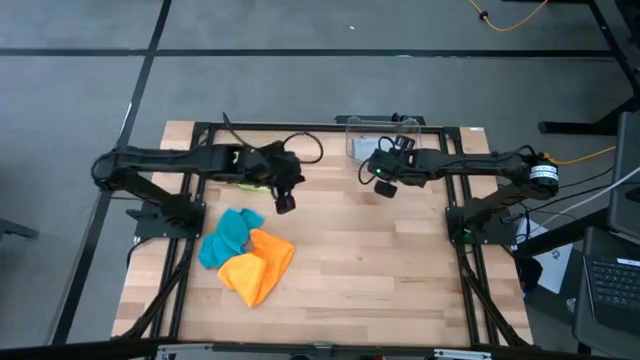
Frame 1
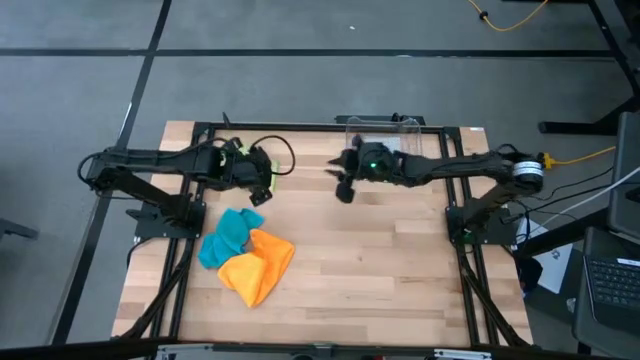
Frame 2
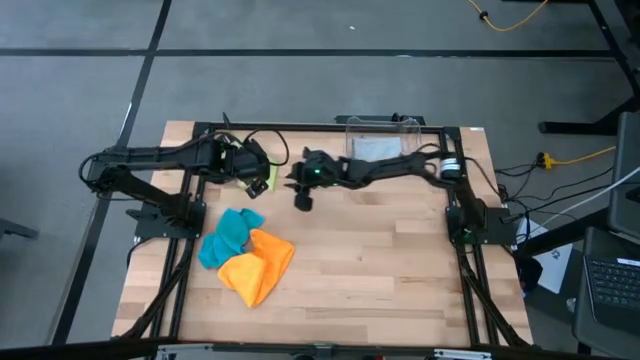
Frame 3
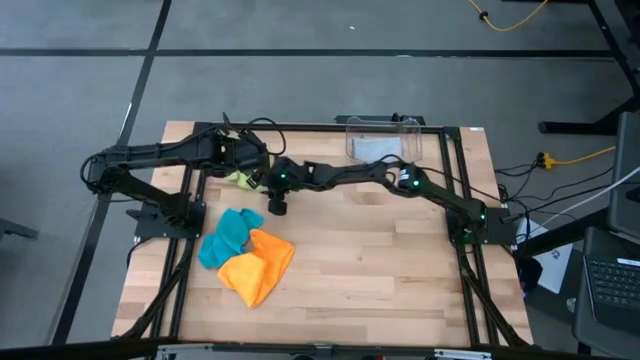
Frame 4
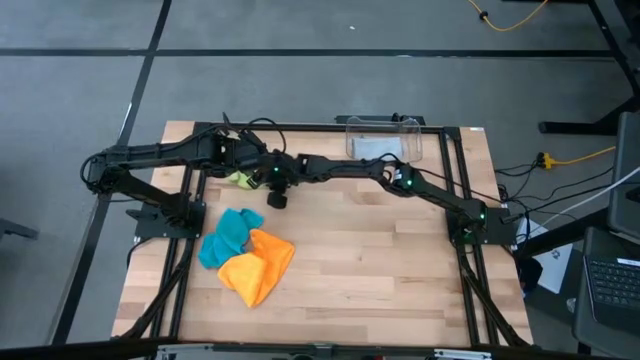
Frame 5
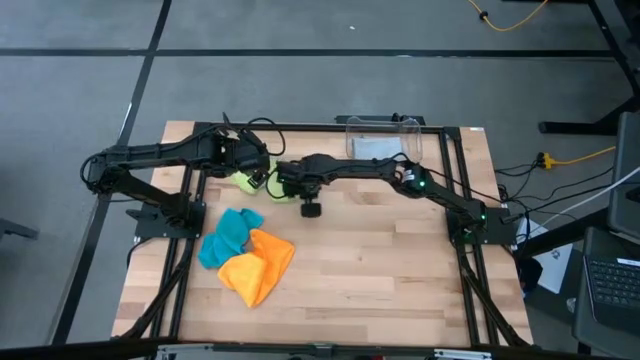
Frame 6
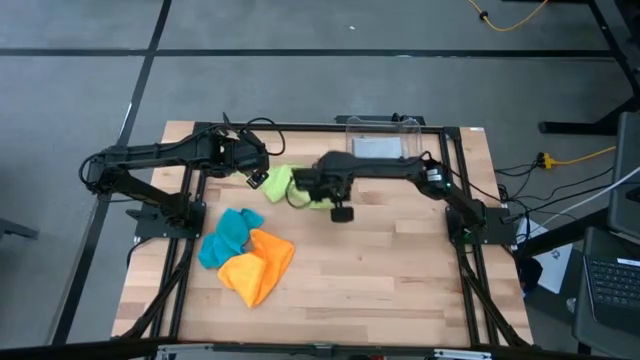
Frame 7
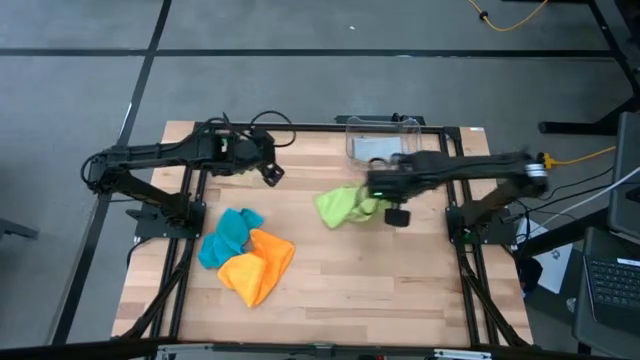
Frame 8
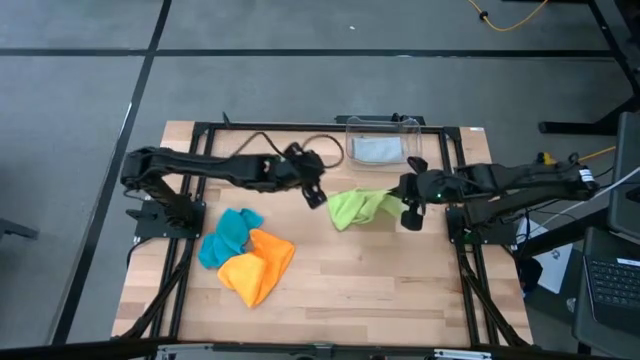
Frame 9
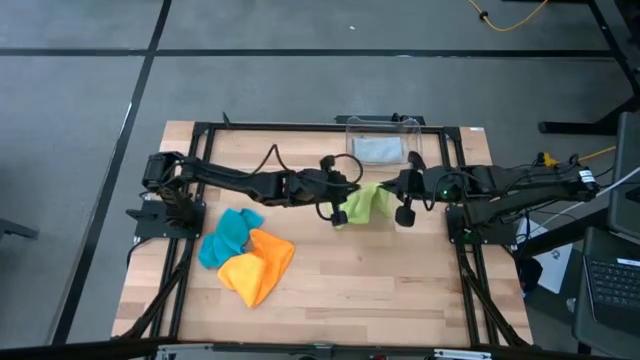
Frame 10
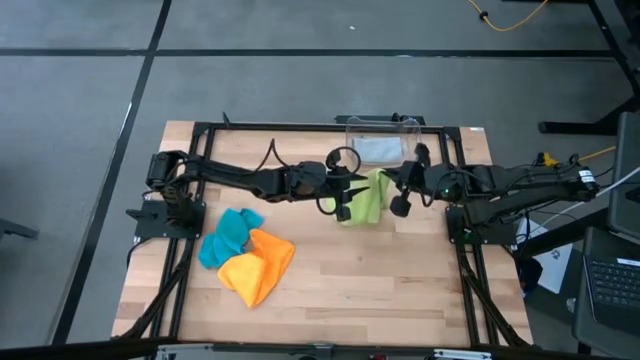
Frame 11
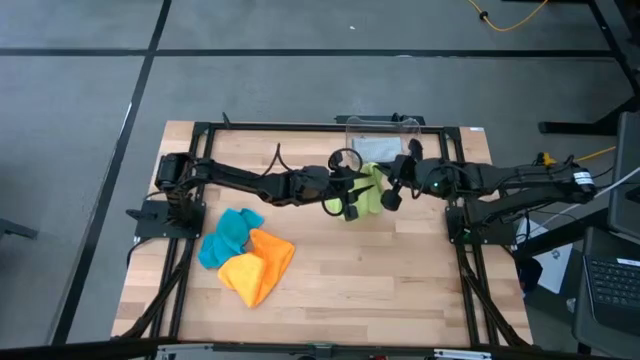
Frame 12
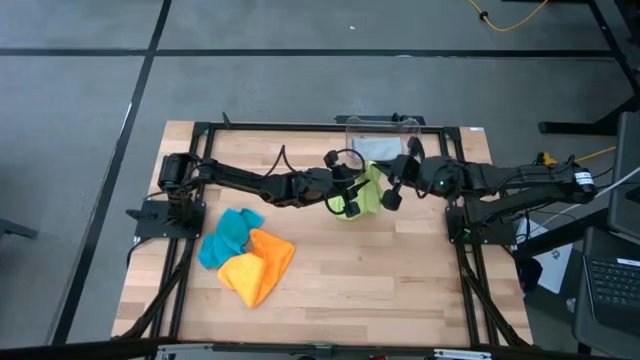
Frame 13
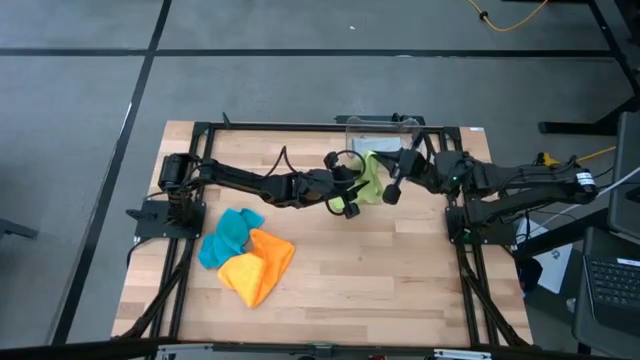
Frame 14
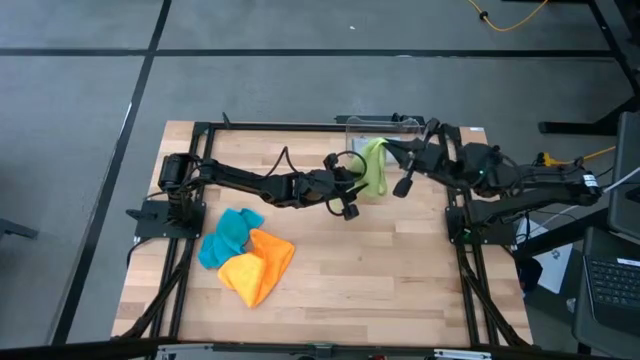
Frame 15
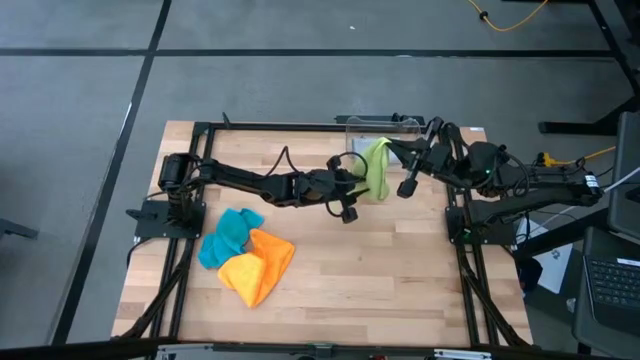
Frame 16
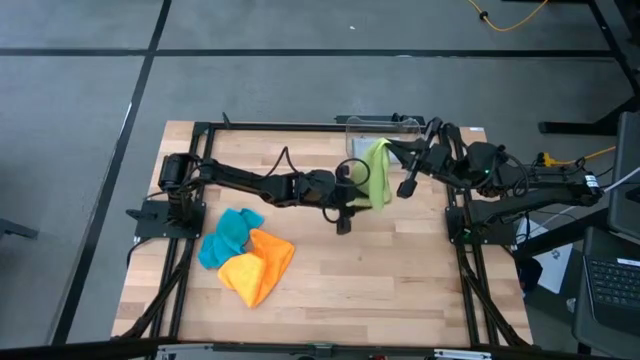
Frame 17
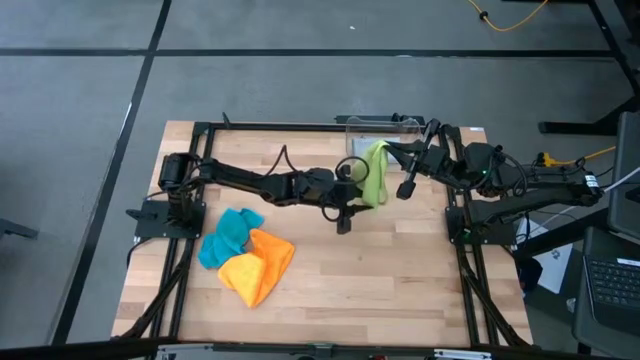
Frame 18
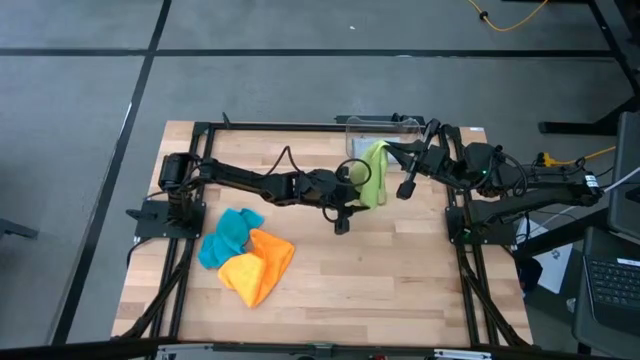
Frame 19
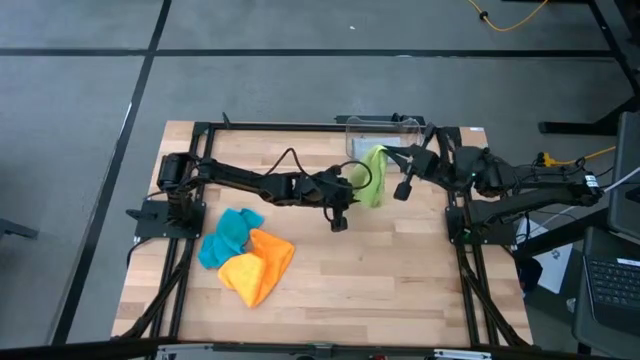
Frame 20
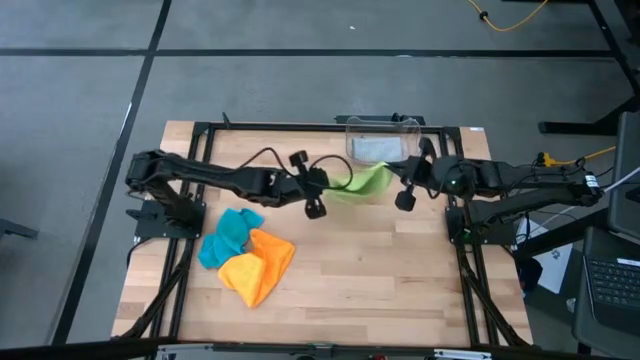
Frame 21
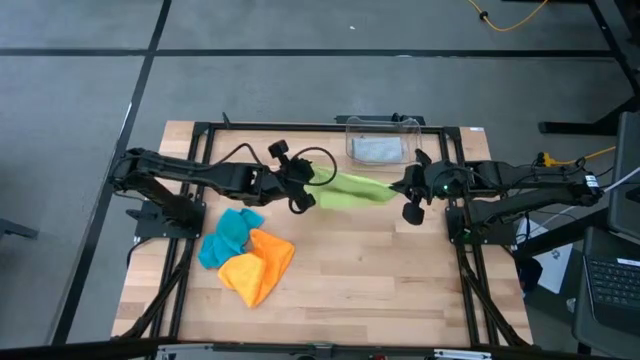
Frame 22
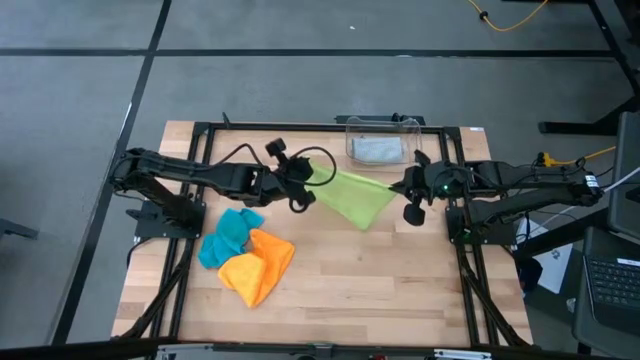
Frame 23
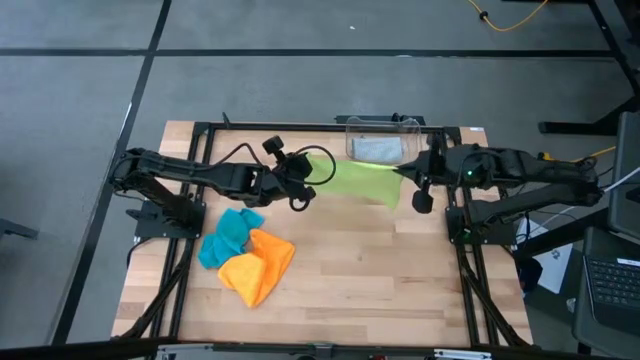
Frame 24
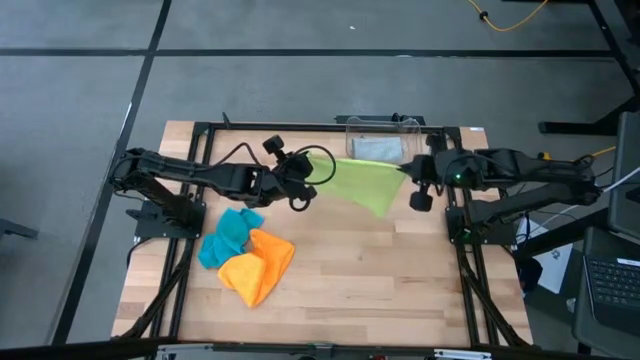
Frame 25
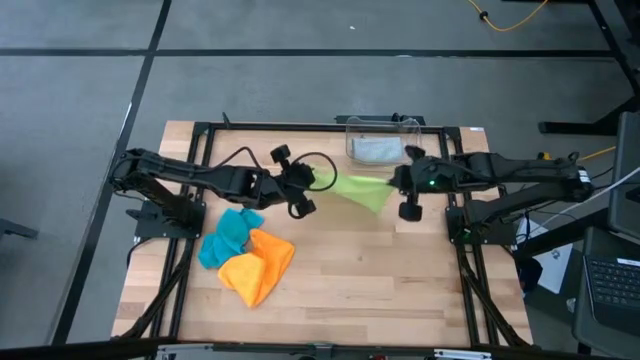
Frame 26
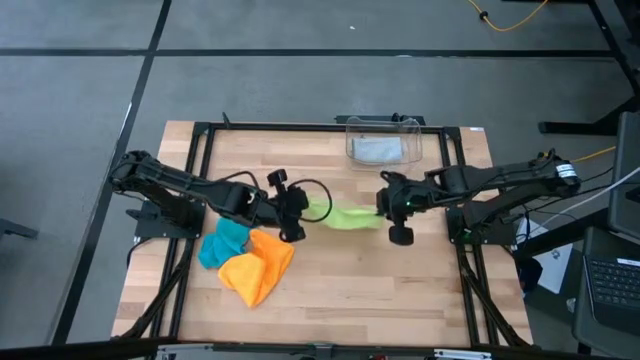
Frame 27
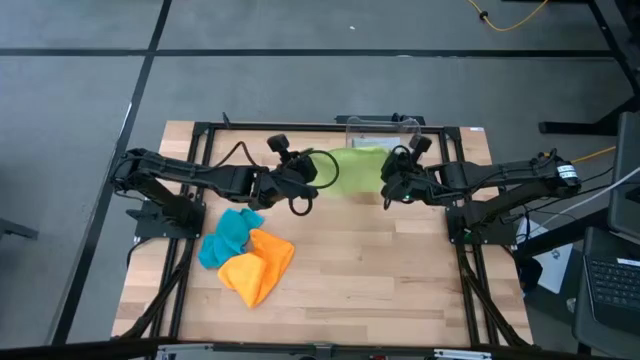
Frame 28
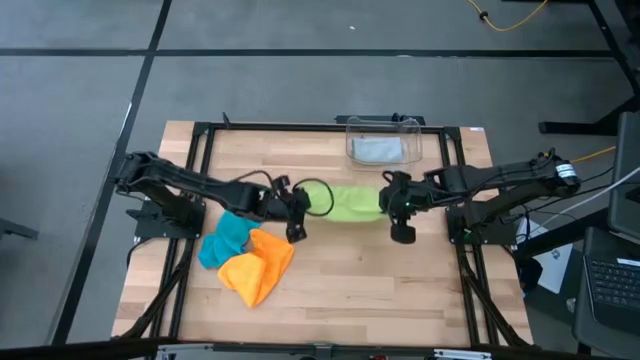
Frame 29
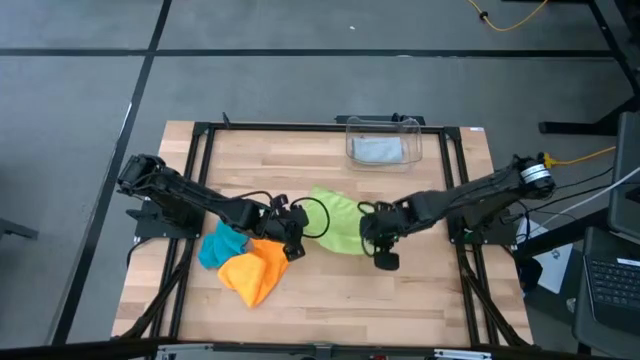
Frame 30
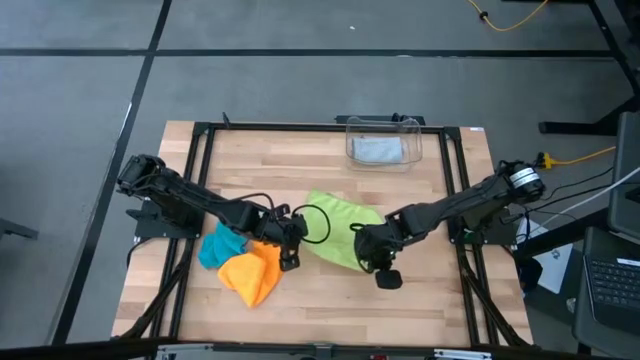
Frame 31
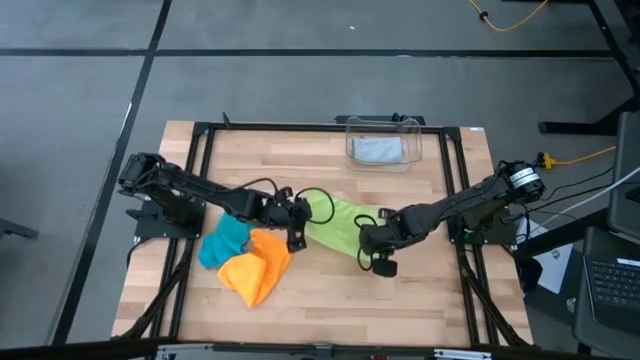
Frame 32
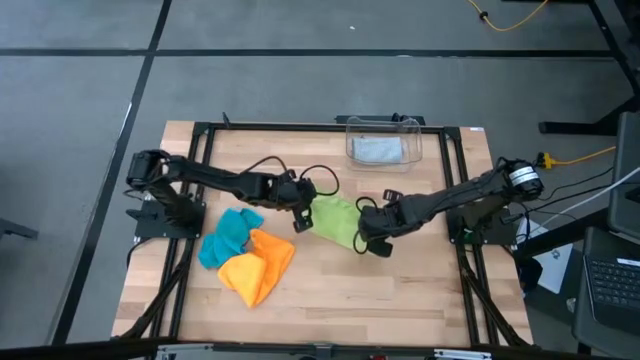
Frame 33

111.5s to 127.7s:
Task: Fold microfiber towels
Fold the green microfiber

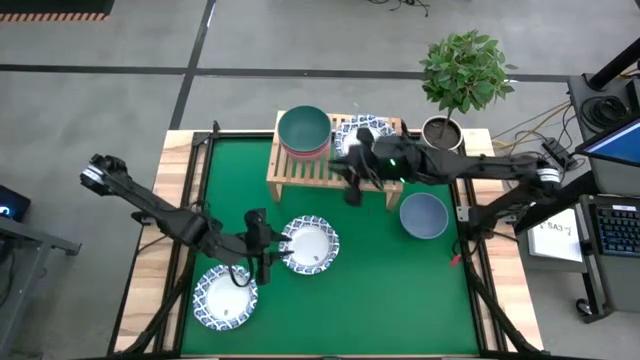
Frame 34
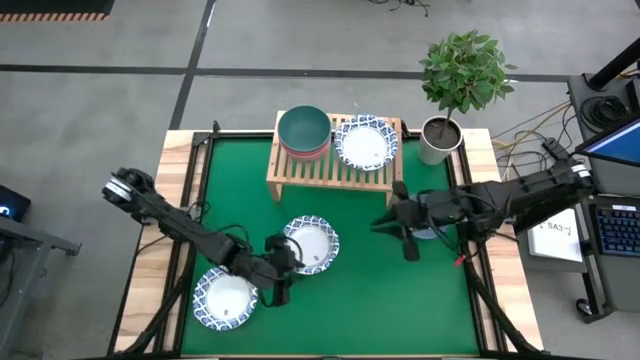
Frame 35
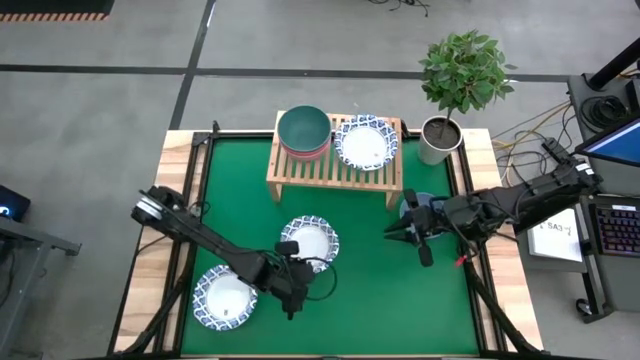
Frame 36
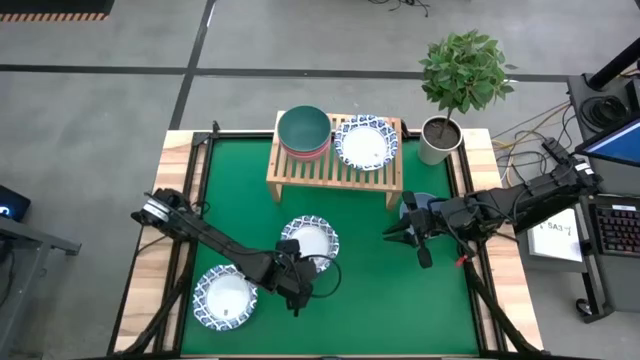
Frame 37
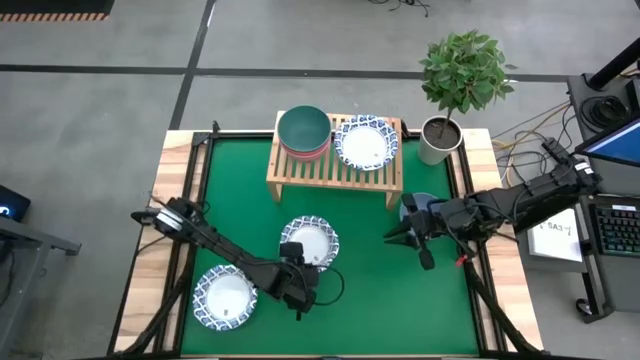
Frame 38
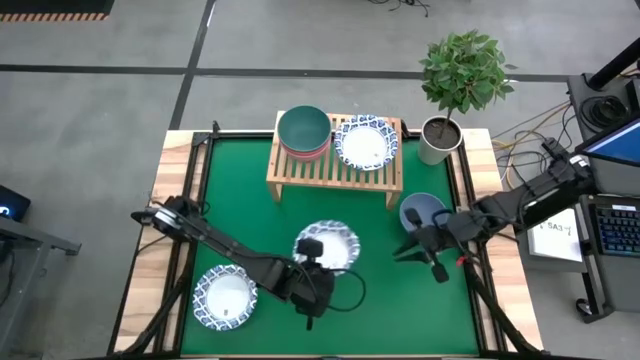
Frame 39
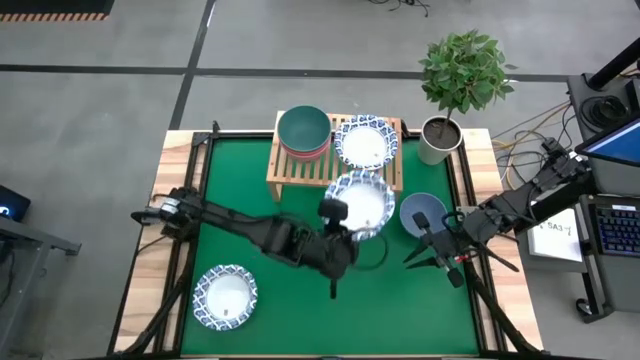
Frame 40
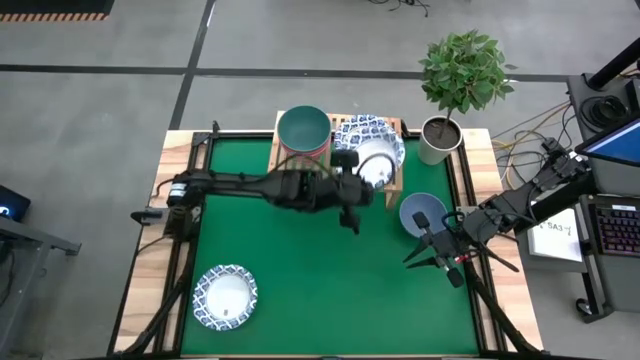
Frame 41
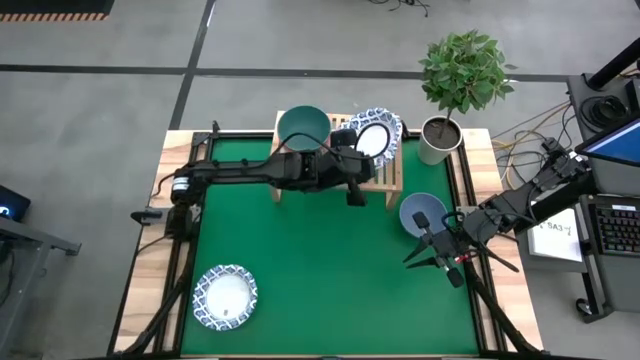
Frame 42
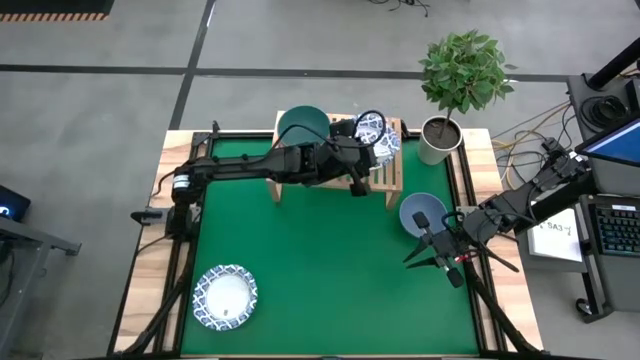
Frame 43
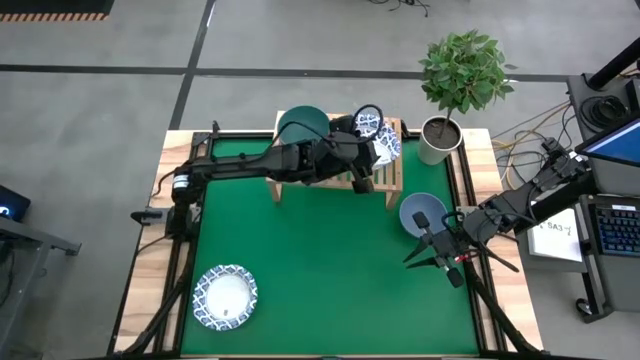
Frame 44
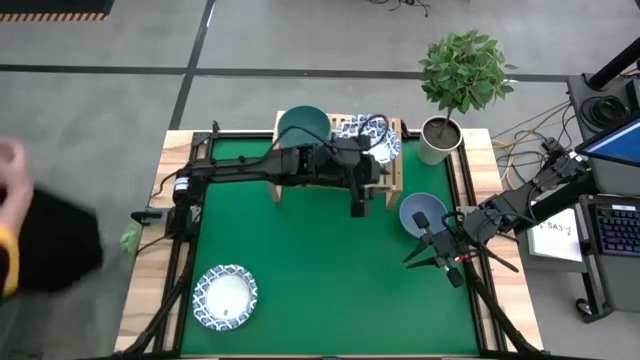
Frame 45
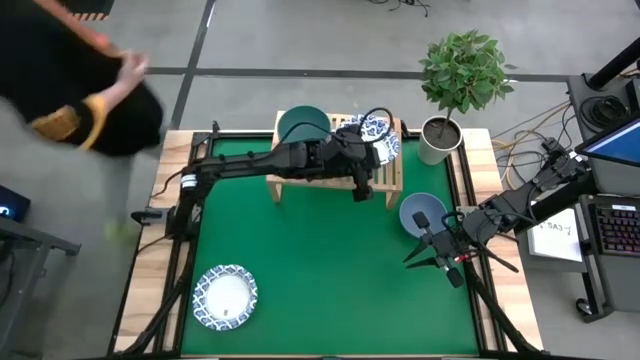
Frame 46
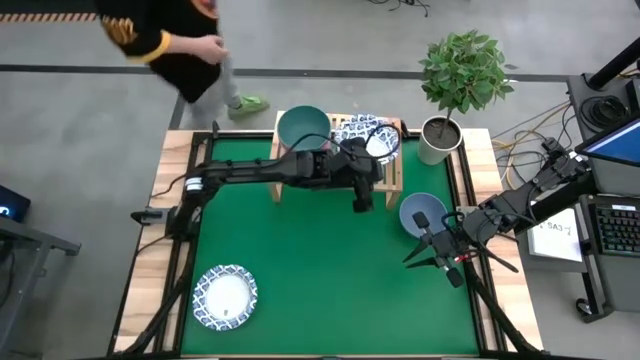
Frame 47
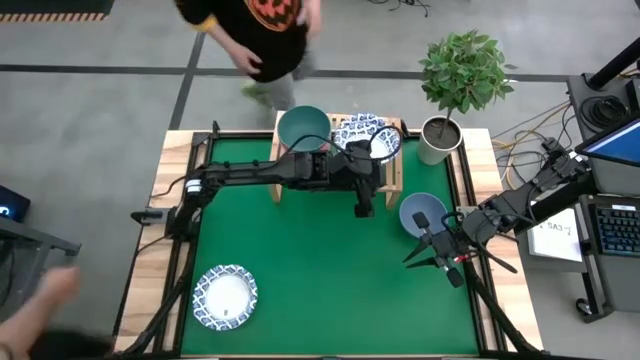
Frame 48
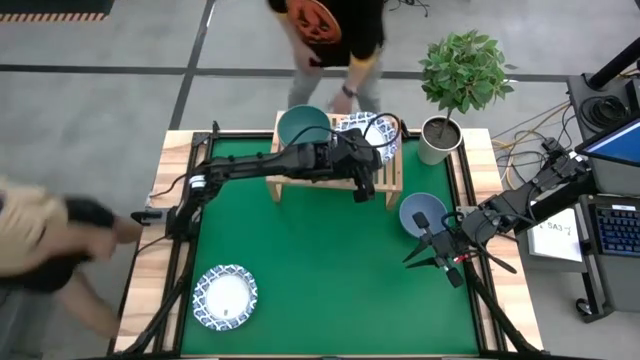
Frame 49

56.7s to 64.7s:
Task: Place and stack bowls onto a shelf
Stack the white bowl on top of the white bowls on the shelf
